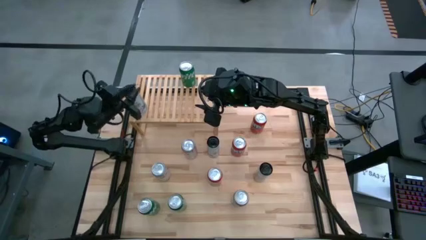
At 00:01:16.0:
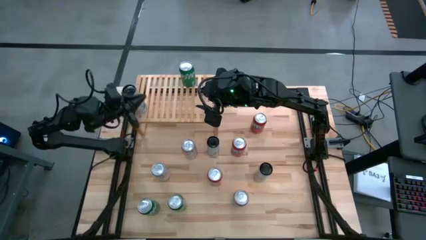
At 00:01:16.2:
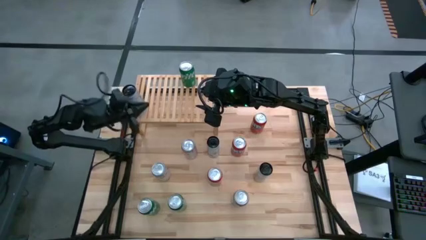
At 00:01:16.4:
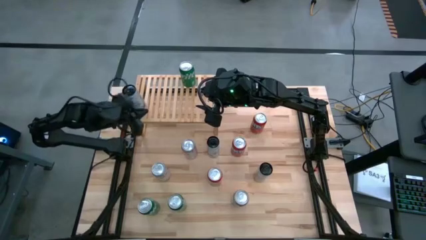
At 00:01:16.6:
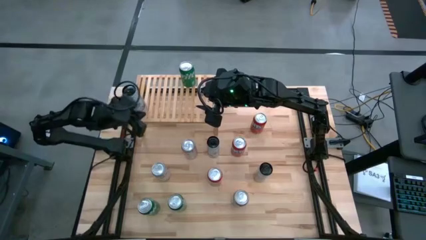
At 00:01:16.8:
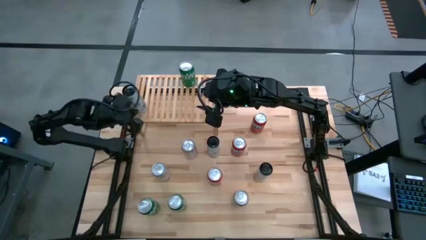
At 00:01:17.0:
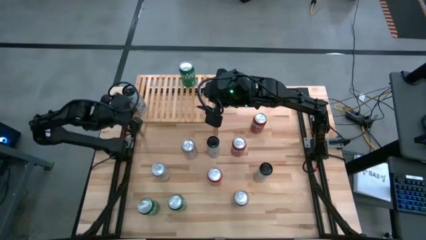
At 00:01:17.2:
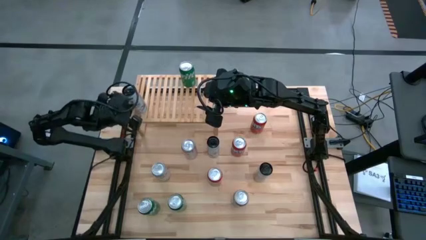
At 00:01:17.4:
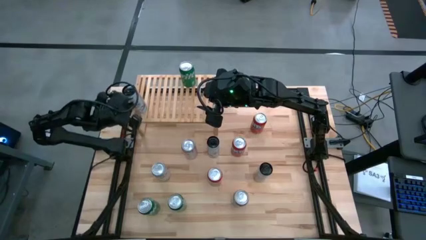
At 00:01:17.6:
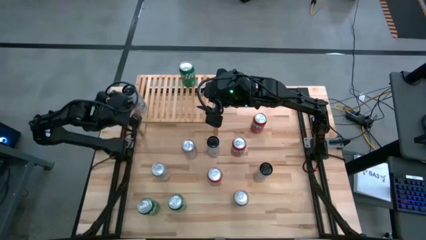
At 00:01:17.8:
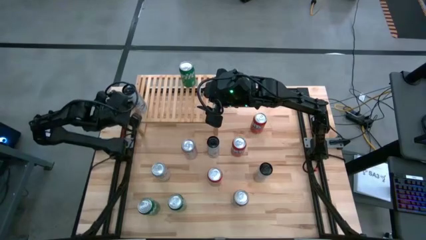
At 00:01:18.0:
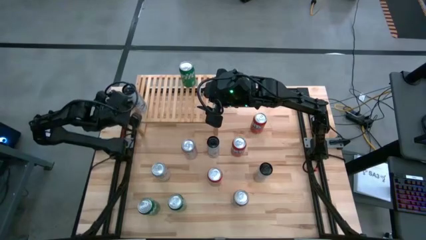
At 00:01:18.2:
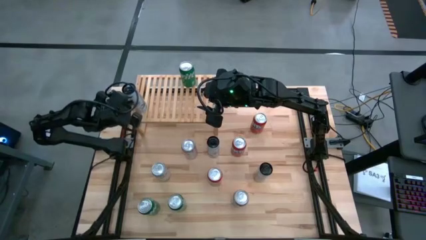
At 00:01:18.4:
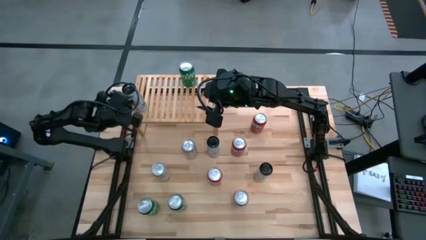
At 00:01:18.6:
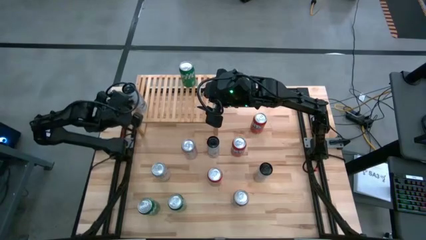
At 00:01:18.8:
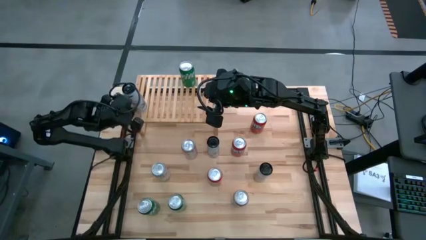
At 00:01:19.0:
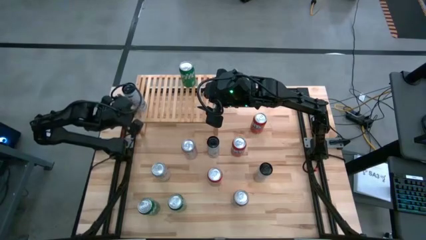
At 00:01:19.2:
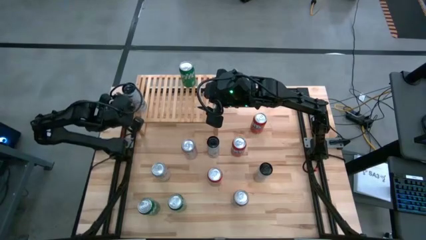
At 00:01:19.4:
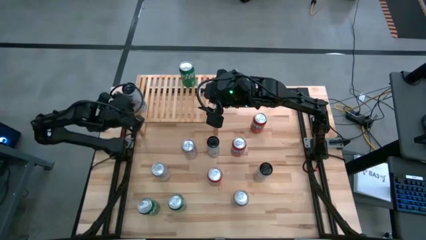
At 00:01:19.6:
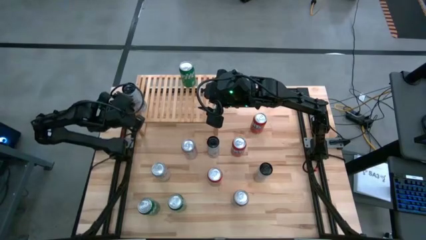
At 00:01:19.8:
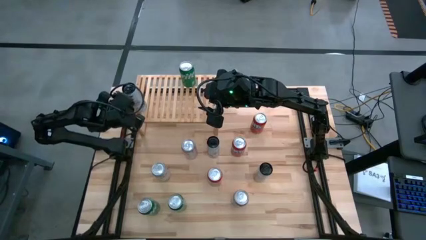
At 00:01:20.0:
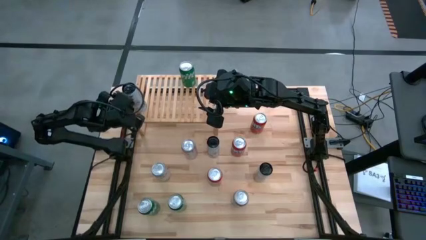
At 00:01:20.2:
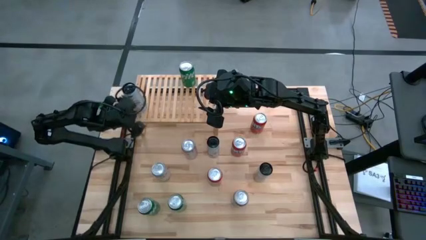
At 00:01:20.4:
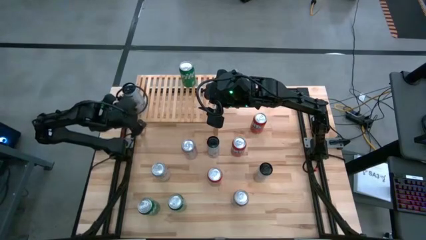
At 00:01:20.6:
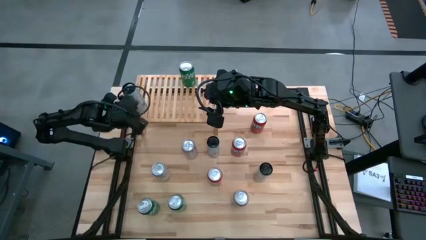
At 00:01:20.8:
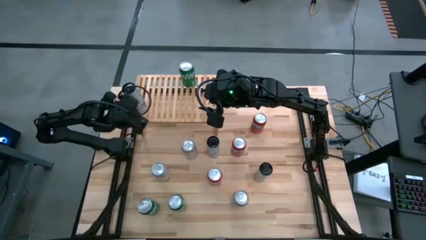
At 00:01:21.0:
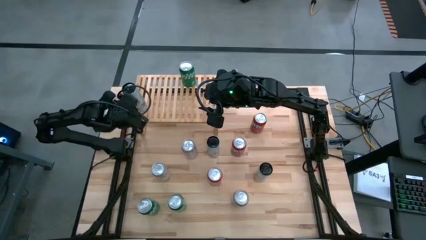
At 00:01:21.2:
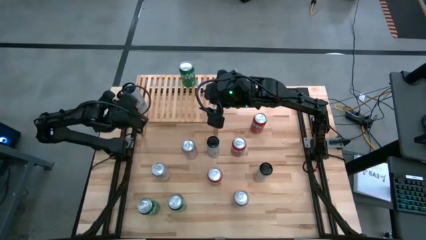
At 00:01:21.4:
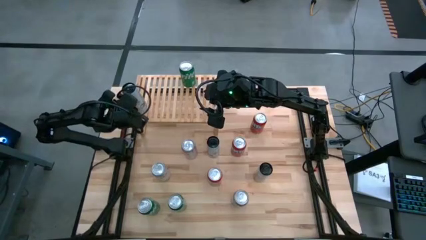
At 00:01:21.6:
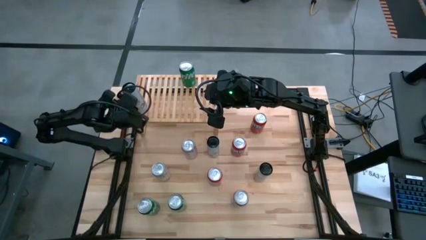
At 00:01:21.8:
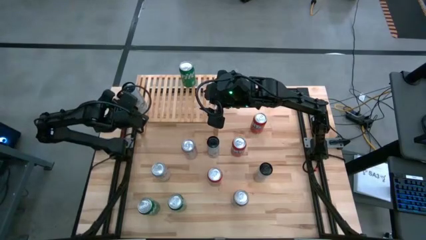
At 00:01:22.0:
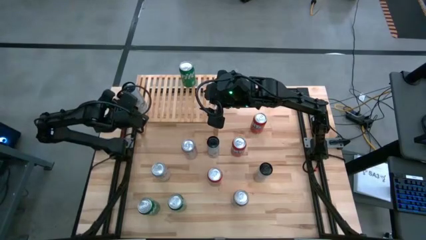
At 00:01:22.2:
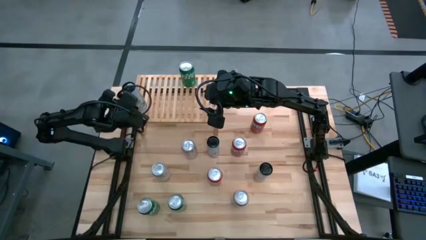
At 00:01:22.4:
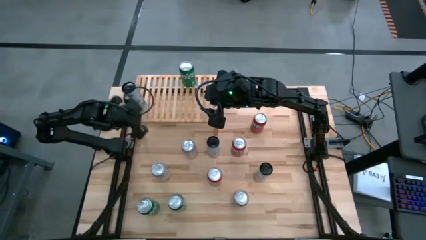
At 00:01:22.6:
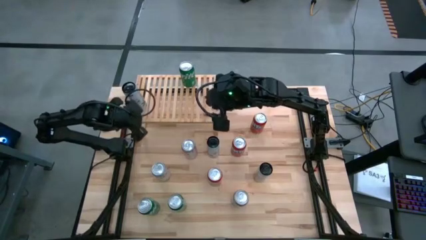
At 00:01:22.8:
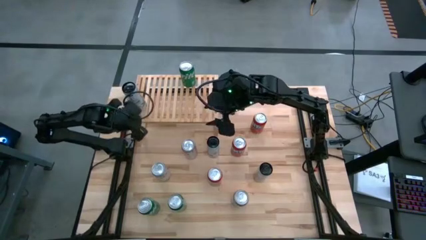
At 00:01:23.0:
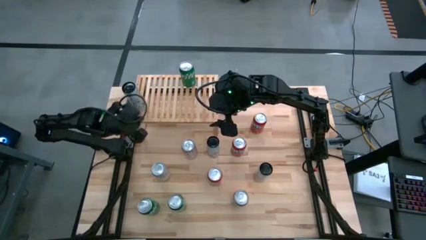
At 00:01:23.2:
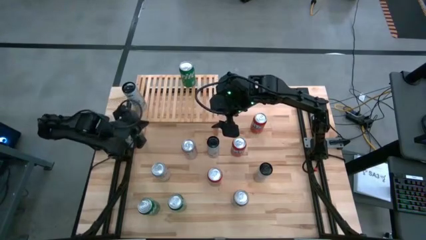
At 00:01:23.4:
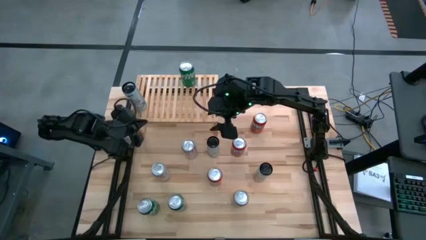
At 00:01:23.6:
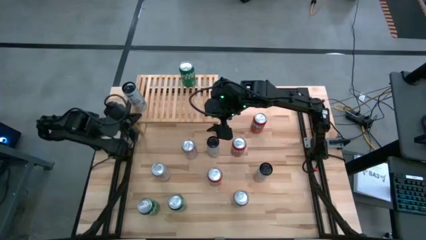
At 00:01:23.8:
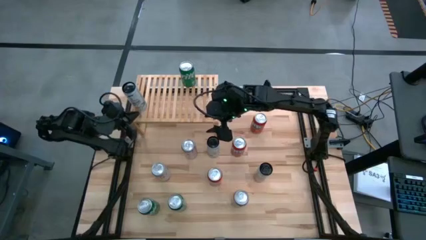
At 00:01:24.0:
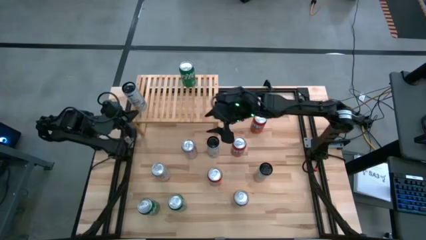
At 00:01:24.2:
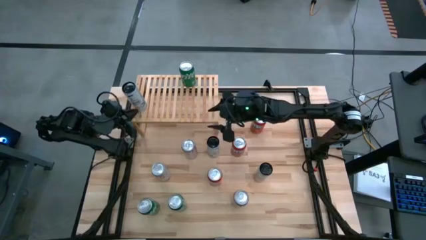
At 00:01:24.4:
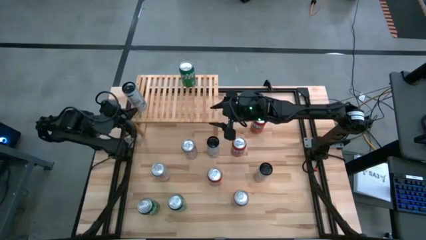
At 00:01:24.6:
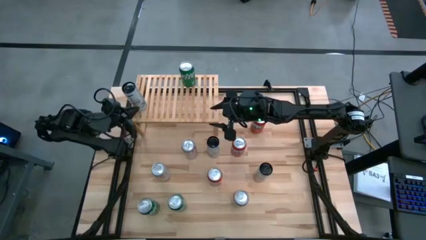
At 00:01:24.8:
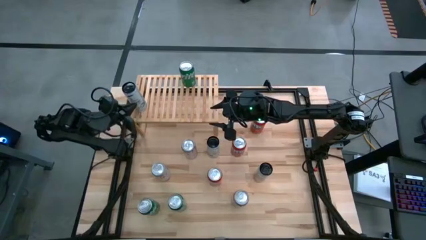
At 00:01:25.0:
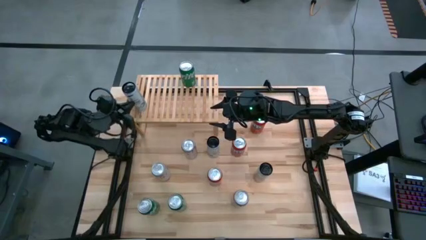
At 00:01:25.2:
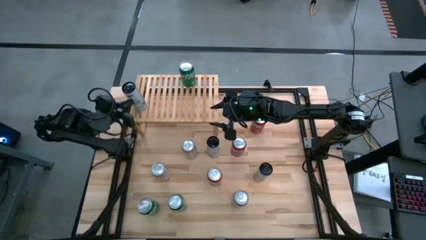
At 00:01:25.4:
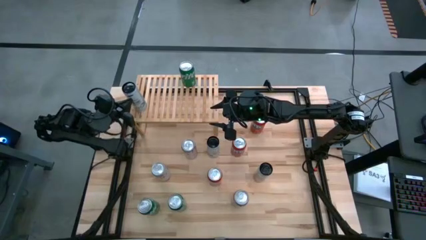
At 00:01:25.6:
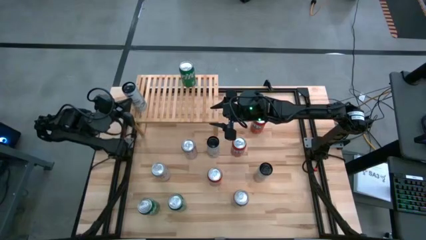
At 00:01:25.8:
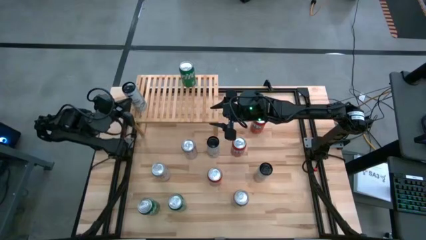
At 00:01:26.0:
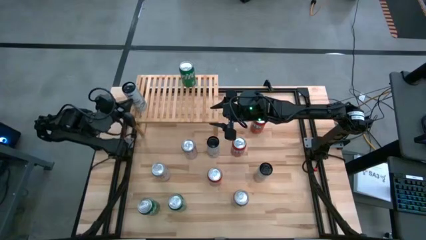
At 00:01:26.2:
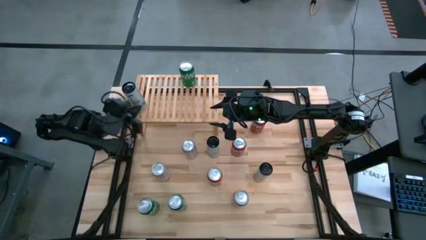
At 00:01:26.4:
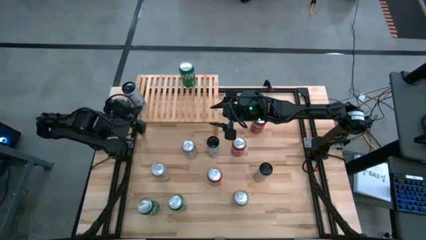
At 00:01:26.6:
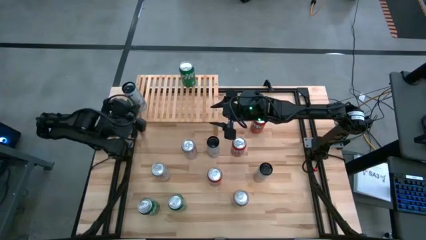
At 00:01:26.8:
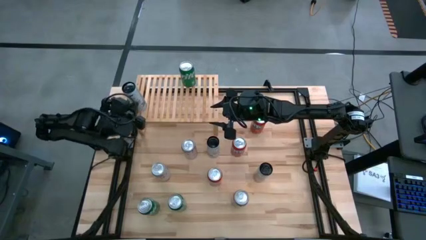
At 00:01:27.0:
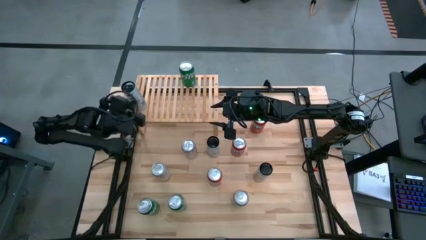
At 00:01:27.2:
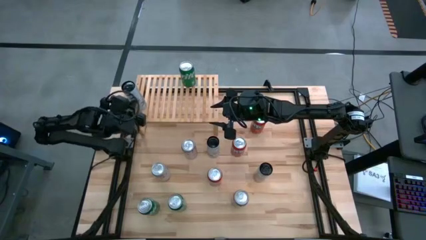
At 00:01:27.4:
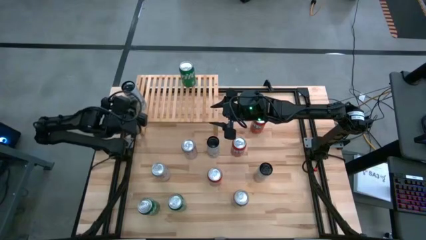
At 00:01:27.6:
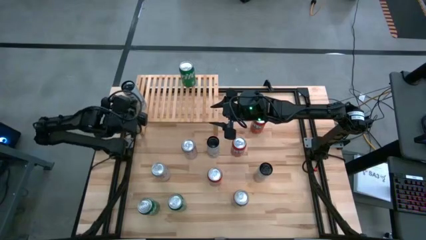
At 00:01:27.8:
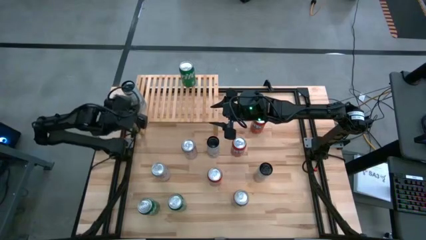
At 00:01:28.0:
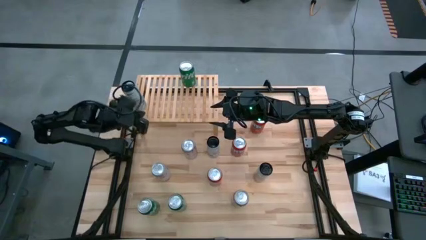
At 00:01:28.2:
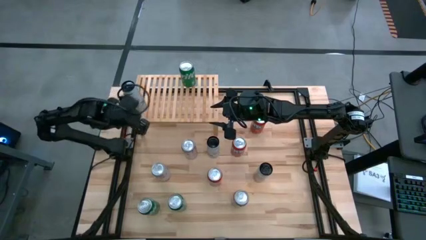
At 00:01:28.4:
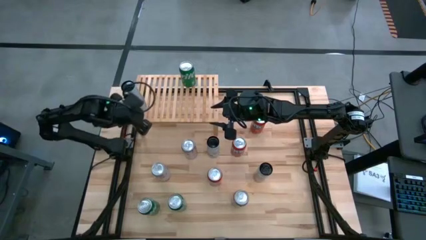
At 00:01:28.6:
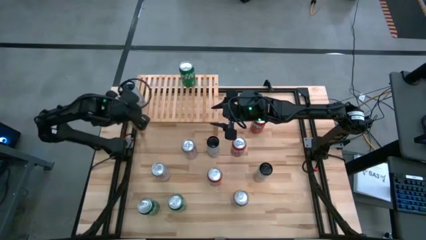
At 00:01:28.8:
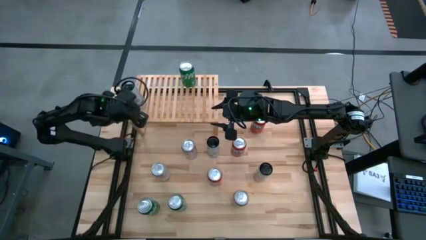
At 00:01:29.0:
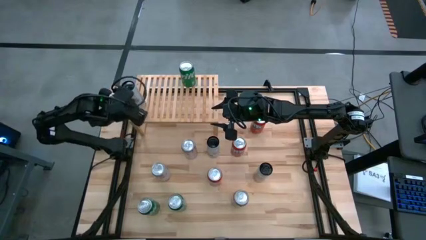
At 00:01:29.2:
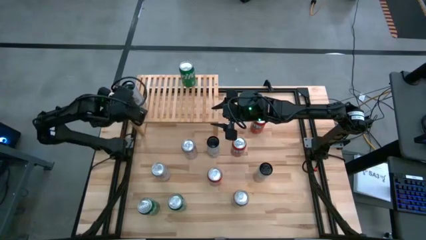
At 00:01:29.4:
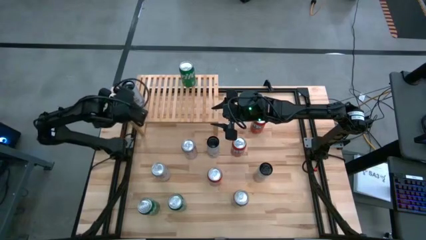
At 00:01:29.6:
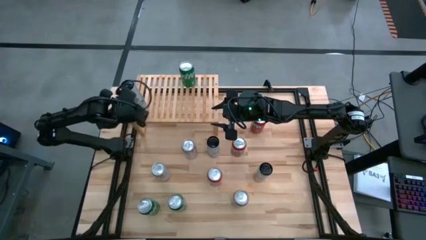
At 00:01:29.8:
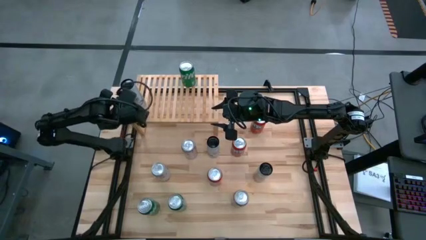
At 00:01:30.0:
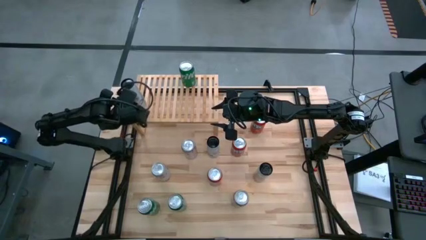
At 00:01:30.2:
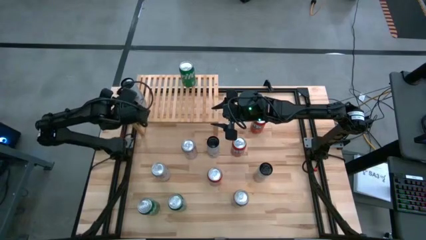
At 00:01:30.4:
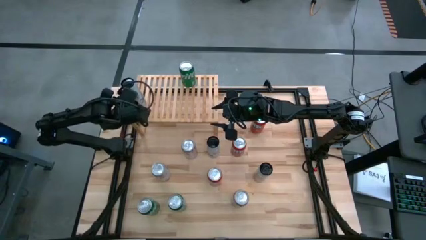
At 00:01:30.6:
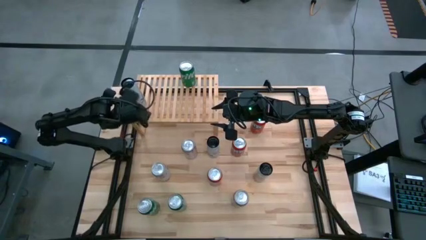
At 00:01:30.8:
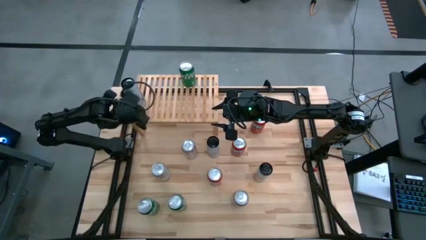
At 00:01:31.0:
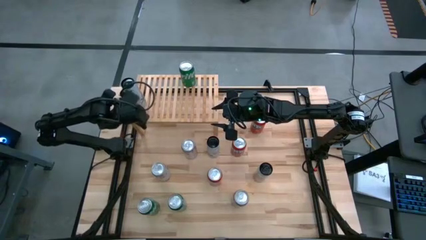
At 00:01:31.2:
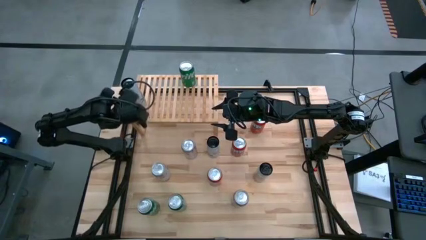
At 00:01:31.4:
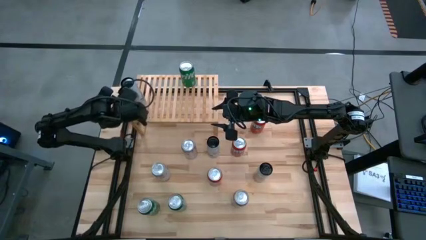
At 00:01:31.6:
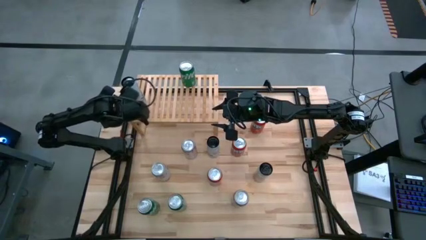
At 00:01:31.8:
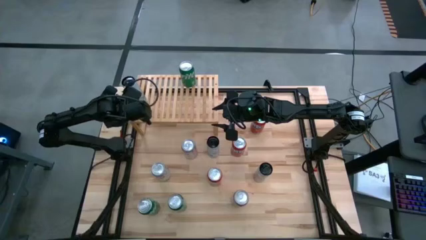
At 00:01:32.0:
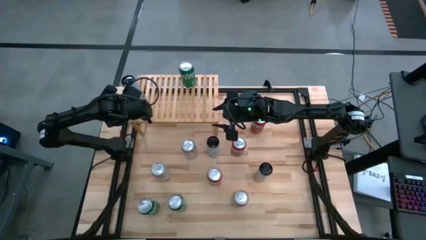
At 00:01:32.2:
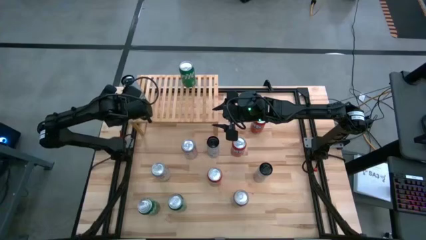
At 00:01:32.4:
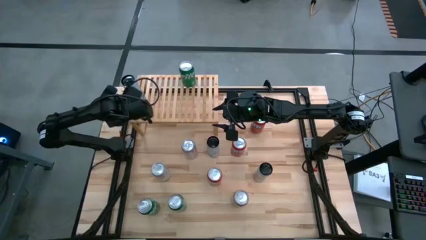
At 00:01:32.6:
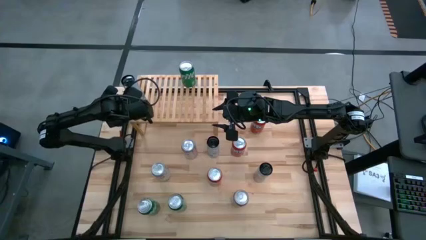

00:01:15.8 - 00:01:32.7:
Task: Place canned beverage on shelf
Put the bottom left white/blue soda can on the shelf
